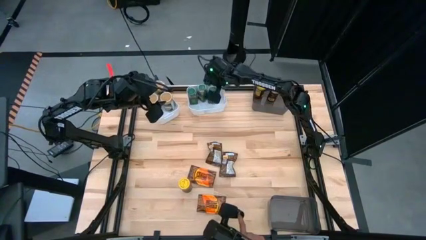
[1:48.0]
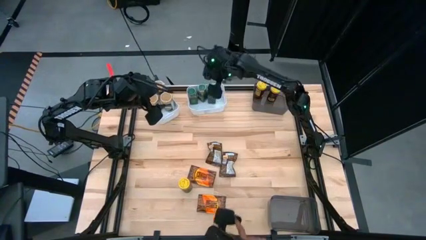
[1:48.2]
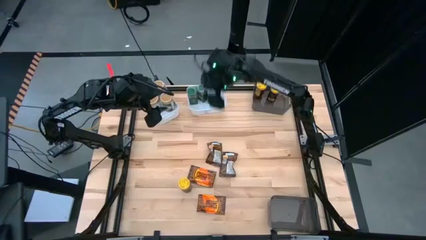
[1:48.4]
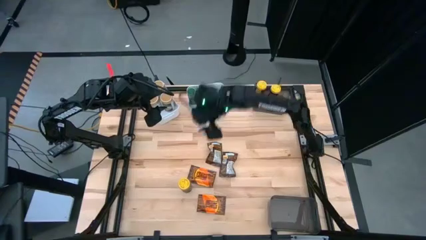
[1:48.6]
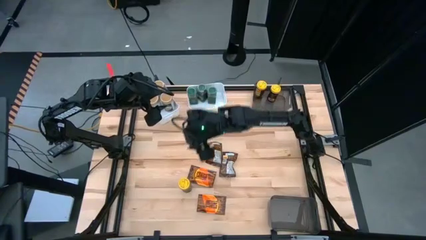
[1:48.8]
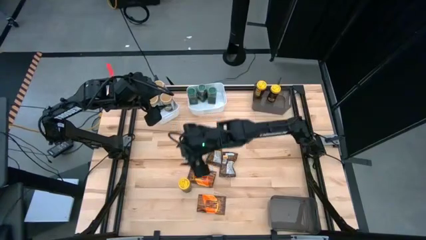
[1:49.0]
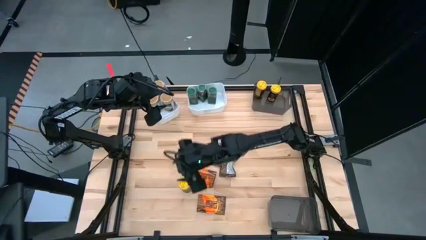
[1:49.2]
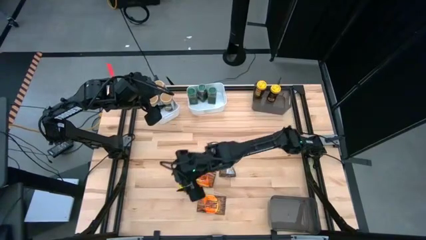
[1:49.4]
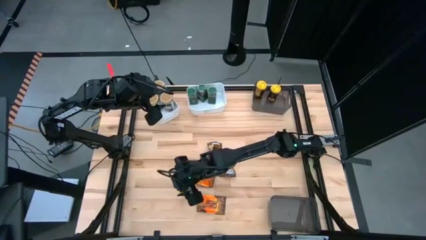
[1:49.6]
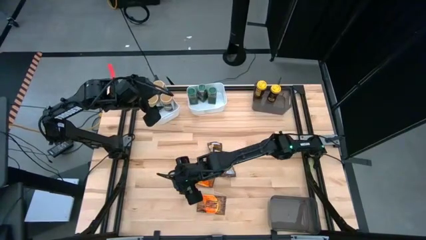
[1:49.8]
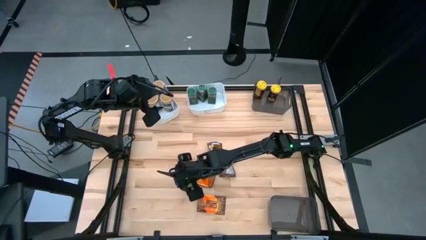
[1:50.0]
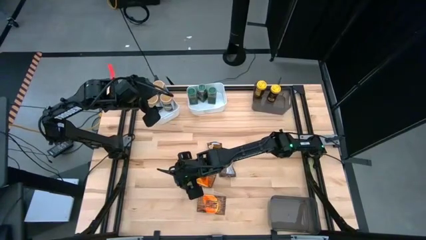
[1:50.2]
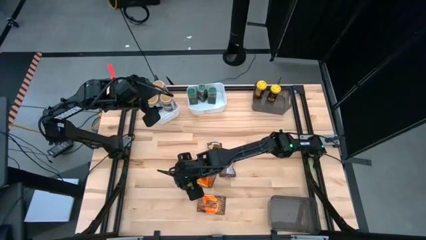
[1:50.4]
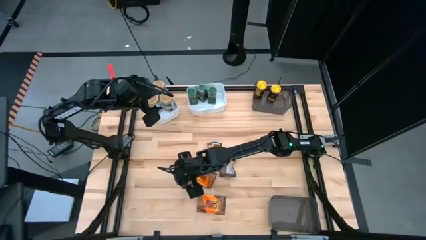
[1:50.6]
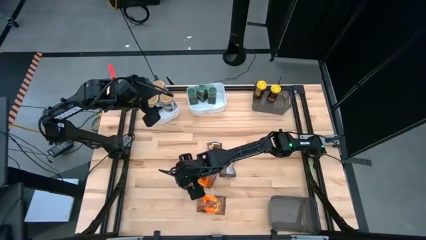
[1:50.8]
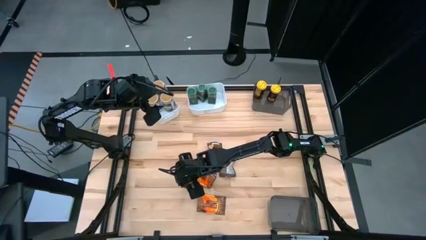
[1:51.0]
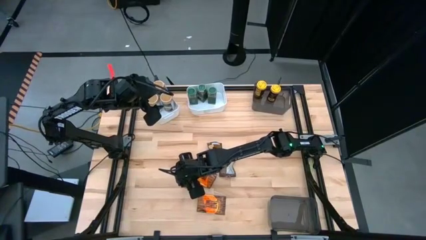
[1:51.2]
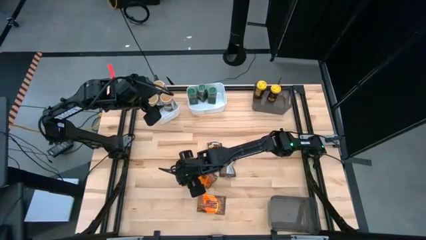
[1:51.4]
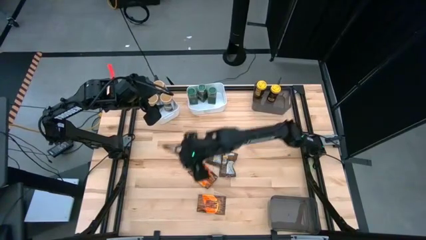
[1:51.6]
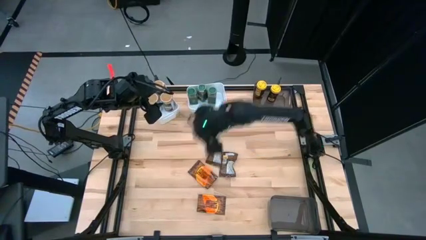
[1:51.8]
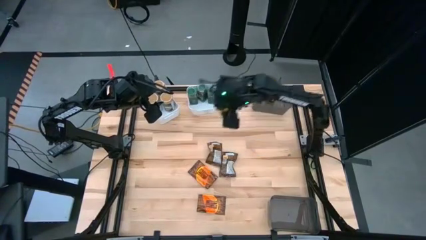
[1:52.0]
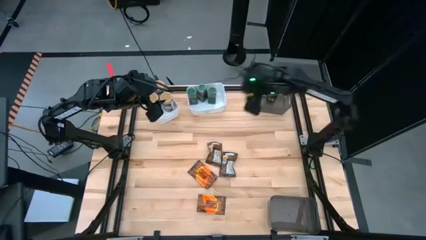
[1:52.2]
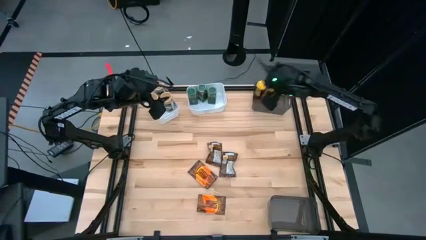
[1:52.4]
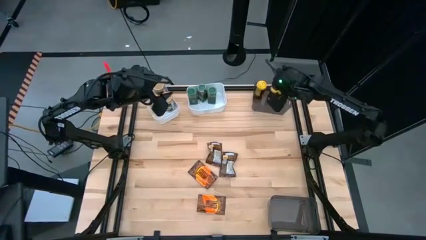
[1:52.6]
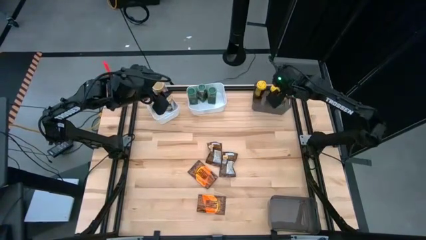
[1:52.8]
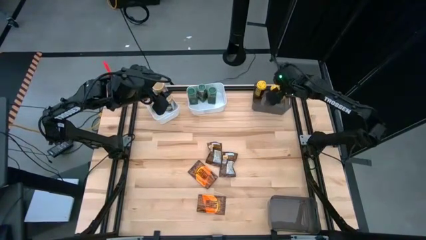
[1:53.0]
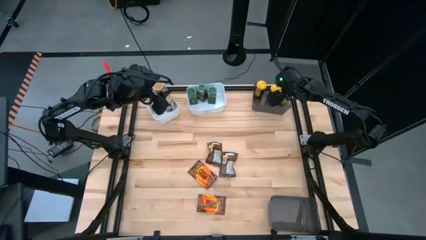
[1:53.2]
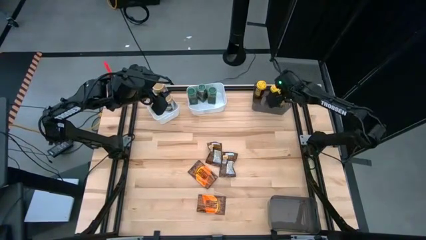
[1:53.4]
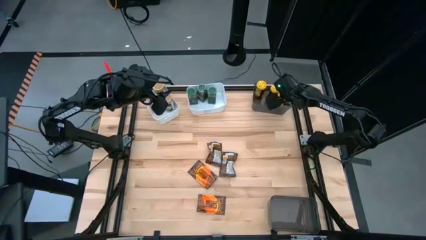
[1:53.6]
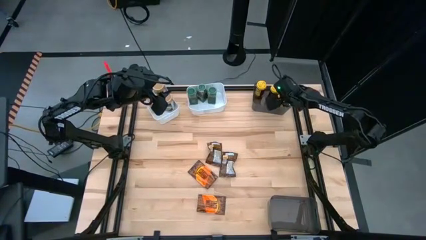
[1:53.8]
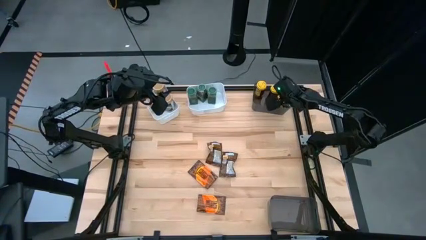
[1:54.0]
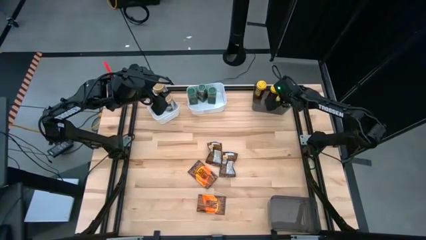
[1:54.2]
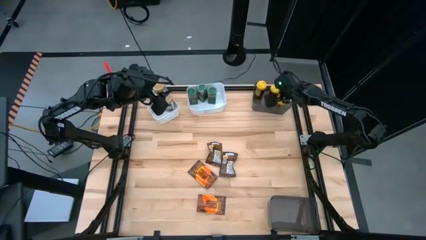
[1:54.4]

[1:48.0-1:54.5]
Task: Sort spices by type
Put the yellow seasoning bottle into the top black bin

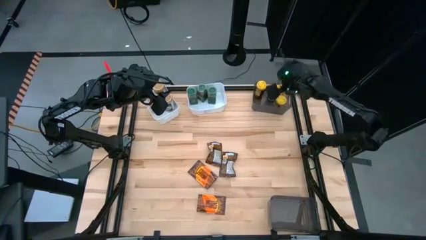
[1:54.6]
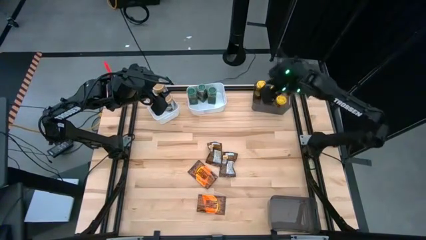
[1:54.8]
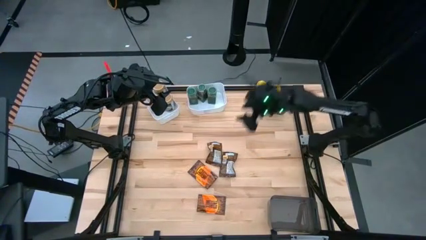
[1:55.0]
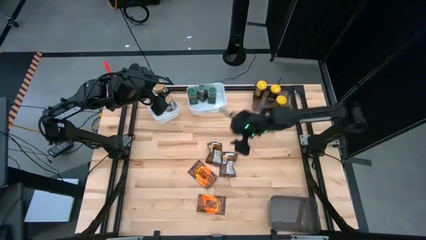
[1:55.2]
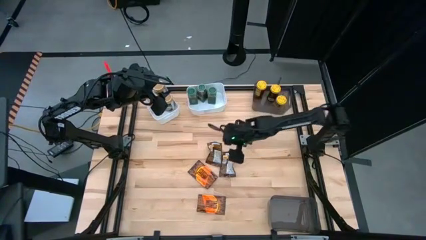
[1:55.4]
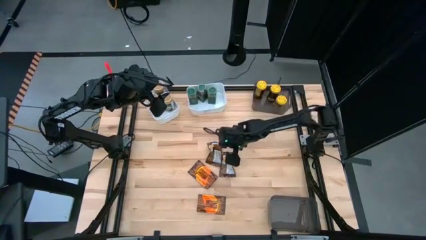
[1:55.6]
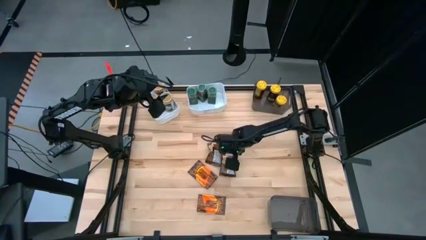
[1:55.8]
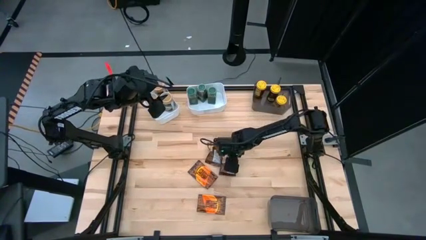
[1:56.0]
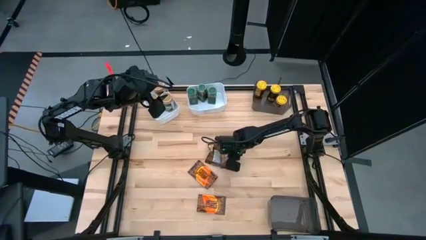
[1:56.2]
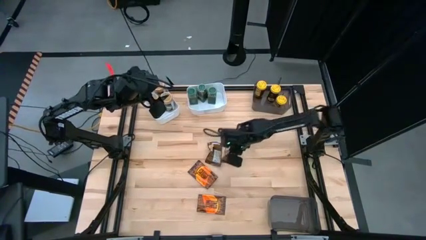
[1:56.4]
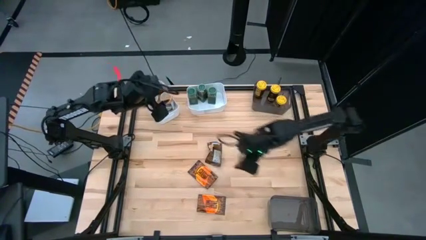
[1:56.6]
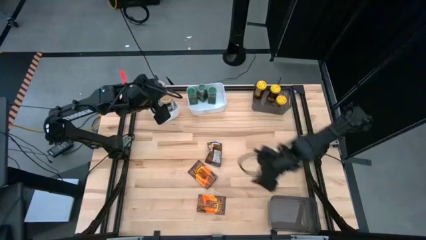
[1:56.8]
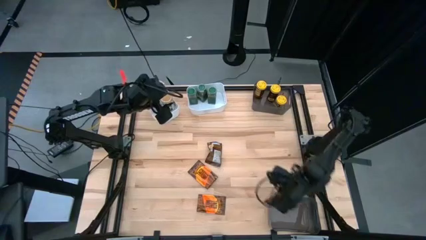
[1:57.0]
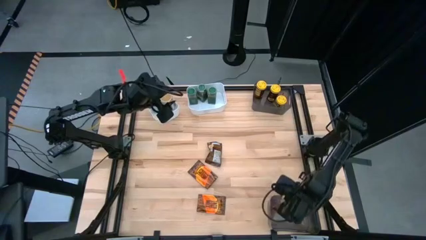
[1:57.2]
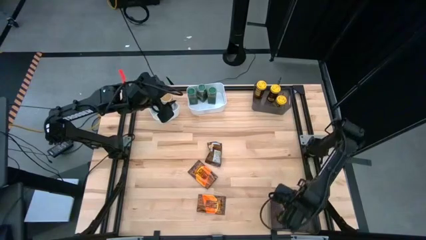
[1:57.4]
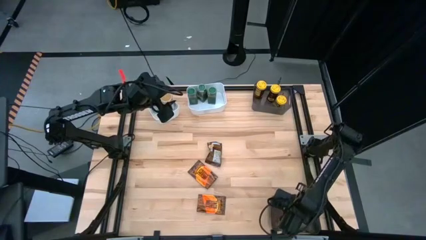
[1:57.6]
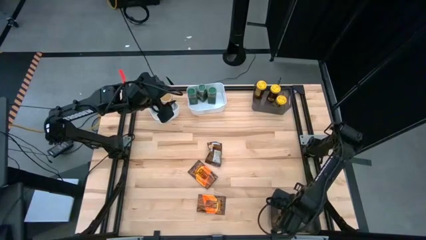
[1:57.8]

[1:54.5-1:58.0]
Put the right orange seasoning bag into the bottom black bin

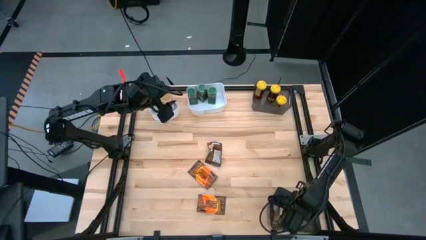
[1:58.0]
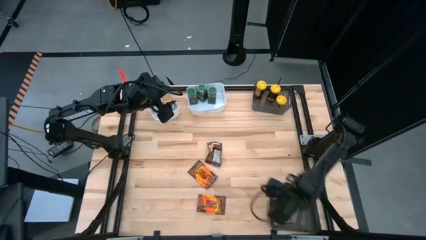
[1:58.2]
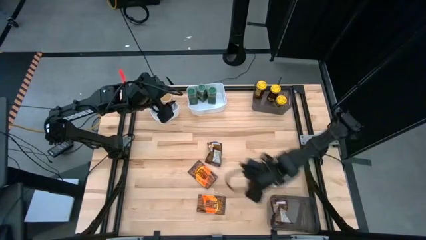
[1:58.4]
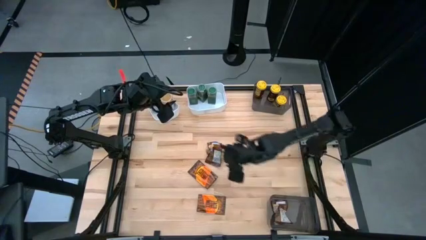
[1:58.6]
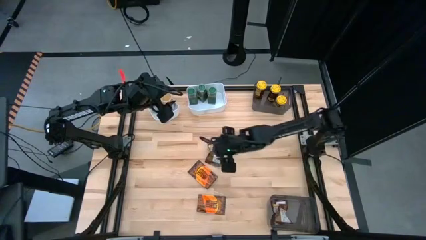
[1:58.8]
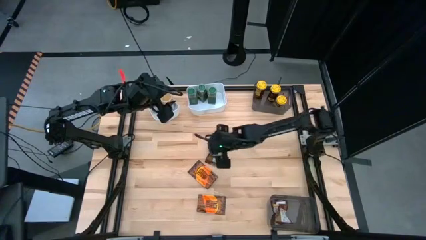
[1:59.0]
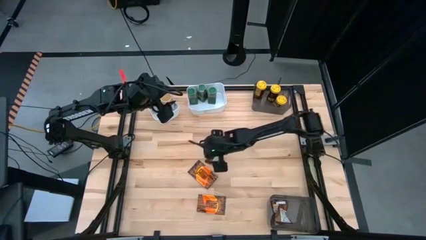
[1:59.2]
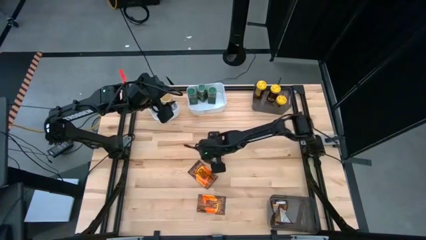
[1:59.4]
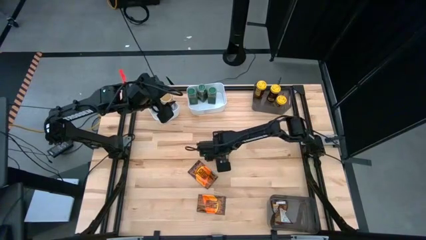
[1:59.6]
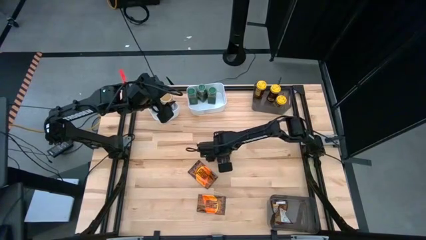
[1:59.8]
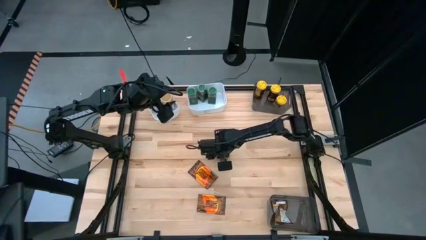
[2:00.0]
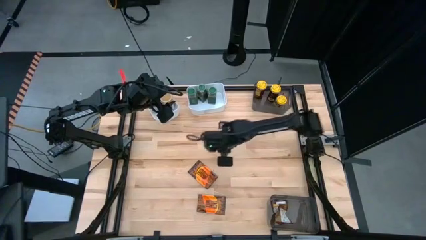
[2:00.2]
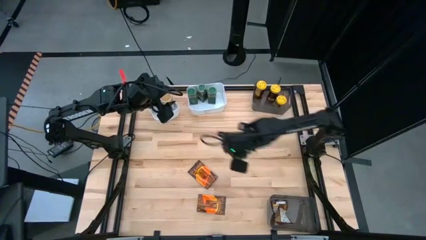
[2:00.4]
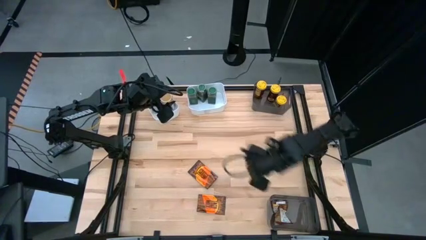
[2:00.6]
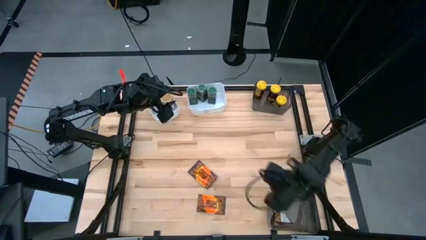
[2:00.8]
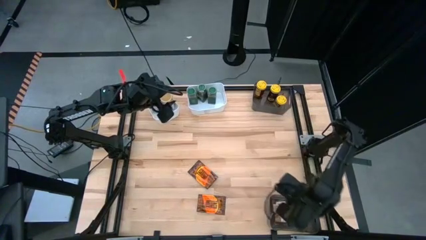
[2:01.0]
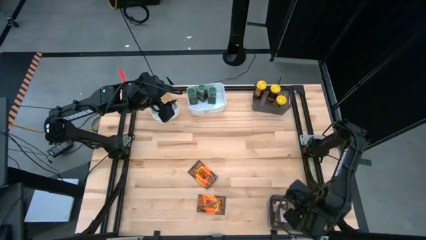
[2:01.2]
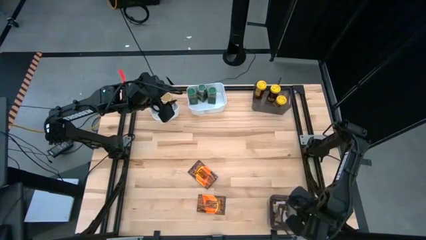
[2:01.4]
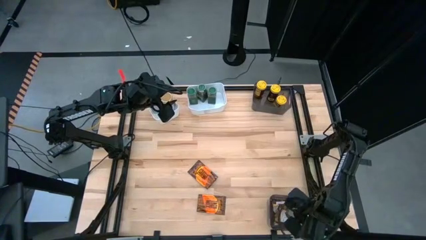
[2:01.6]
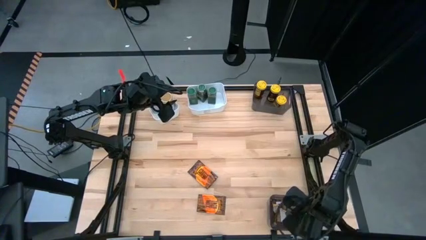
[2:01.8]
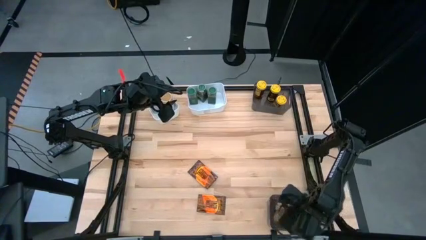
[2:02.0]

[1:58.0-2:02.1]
Put the top orange seasoning bag into the bottom black bin

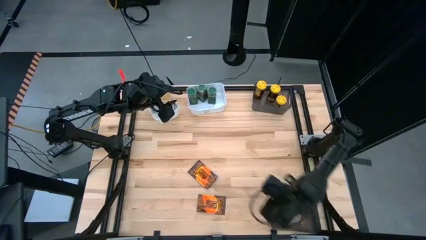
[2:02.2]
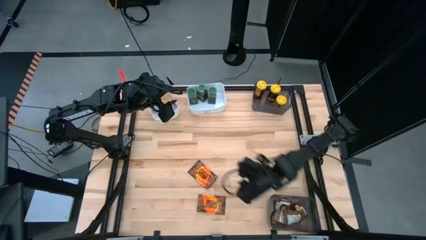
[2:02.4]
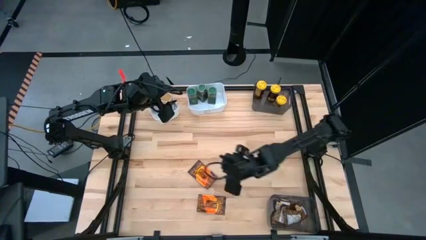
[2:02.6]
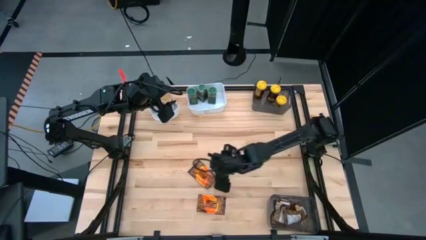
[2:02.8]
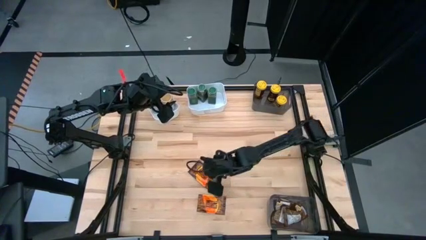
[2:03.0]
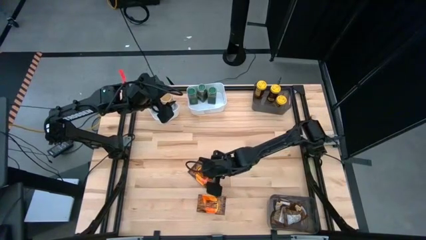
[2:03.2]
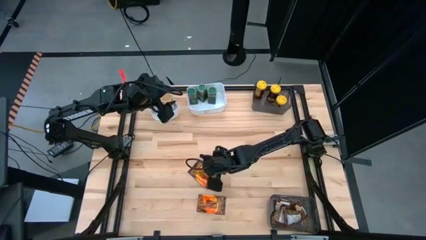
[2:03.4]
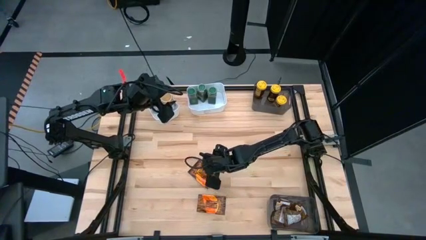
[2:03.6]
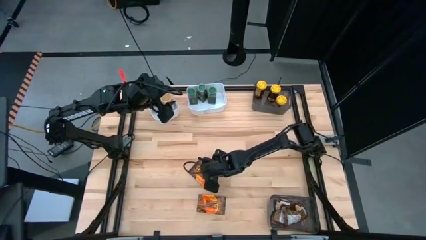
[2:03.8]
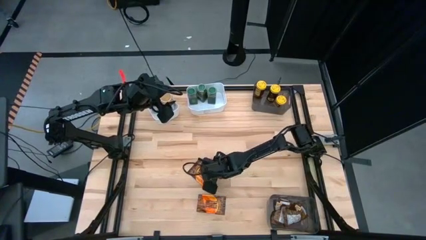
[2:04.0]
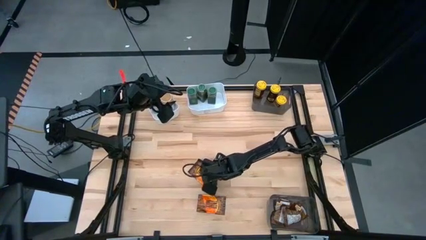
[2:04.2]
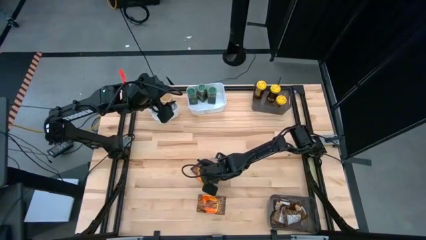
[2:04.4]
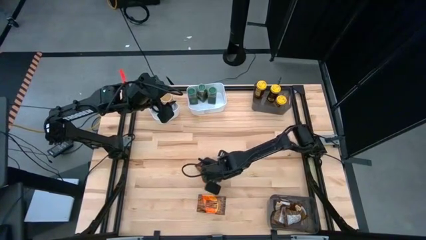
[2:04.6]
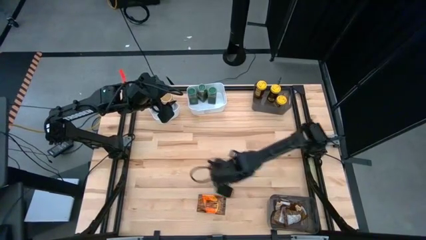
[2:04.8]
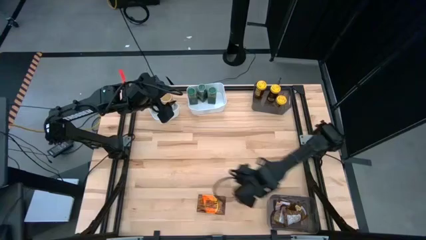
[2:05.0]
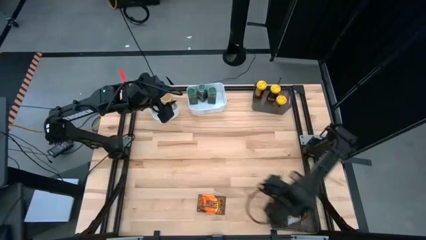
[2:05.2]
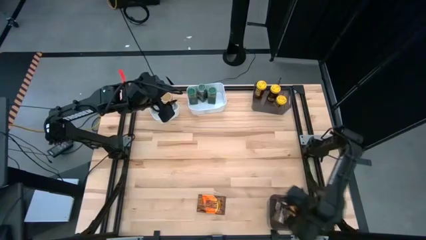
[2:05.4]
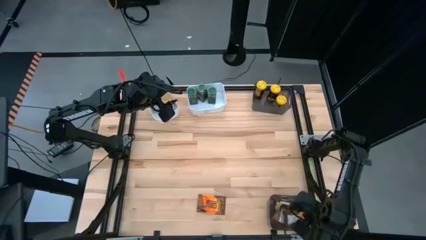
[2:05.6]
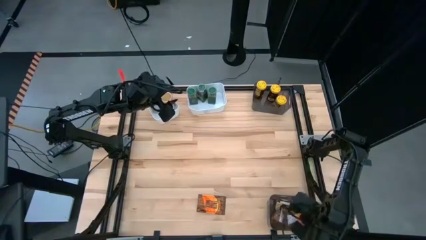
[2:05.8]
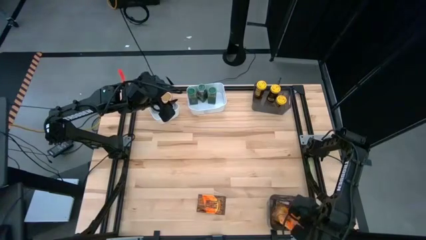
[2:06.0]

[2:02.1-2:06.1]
Put the top orange seasoning bag into the bottom black bin
